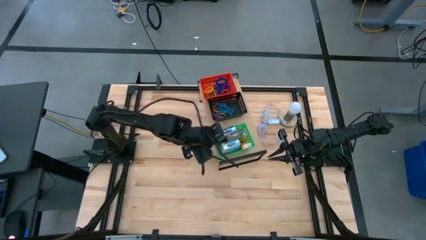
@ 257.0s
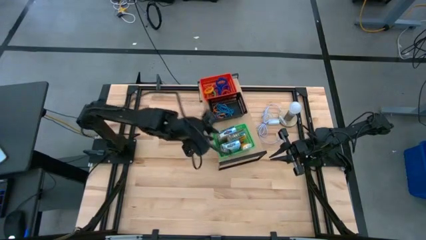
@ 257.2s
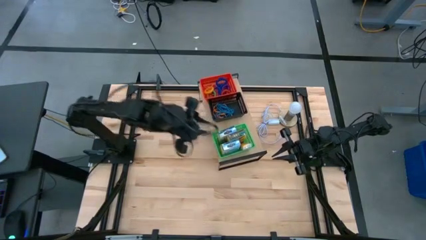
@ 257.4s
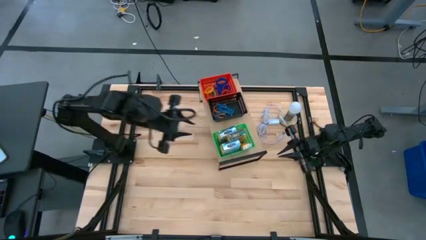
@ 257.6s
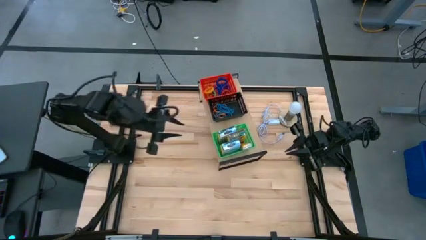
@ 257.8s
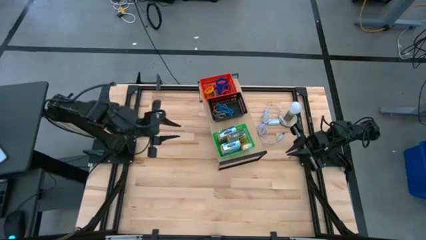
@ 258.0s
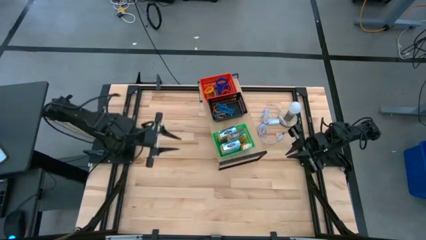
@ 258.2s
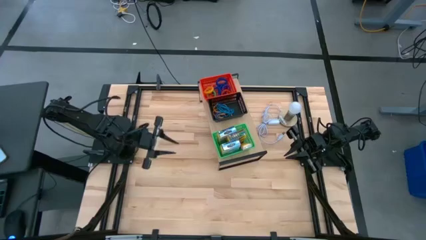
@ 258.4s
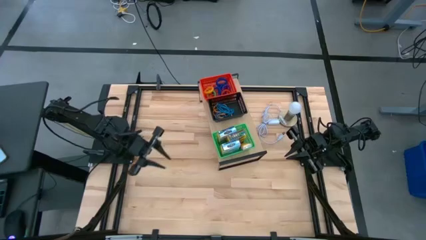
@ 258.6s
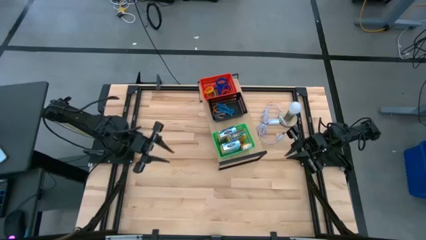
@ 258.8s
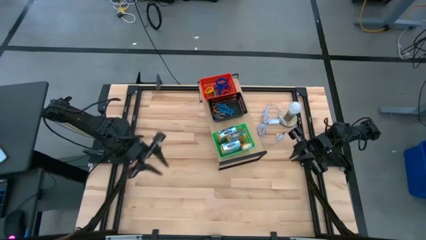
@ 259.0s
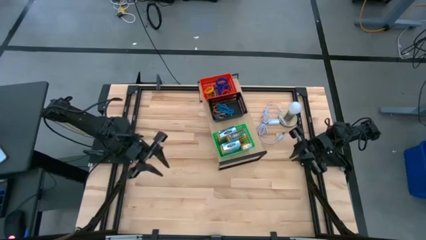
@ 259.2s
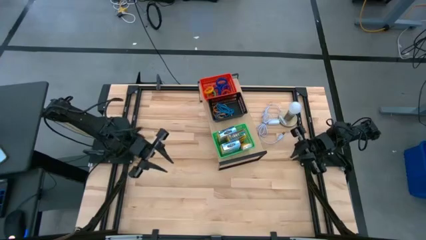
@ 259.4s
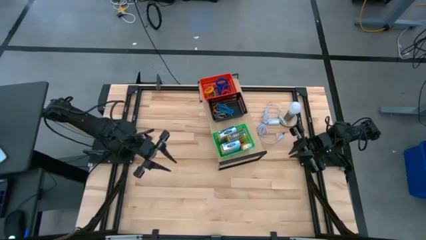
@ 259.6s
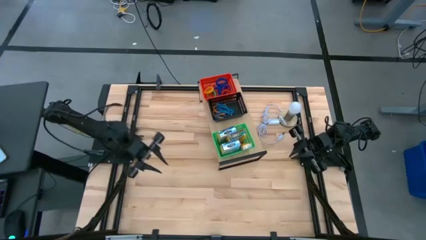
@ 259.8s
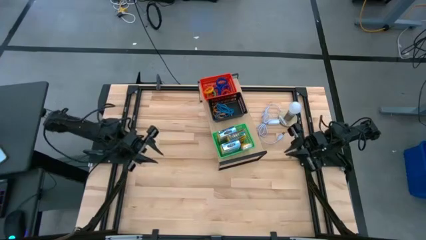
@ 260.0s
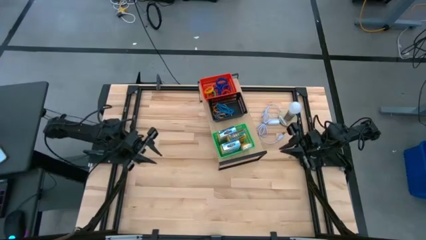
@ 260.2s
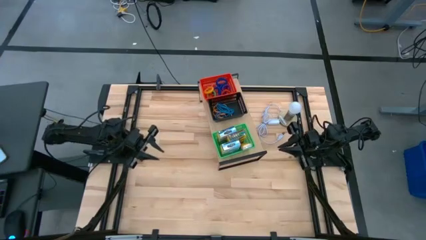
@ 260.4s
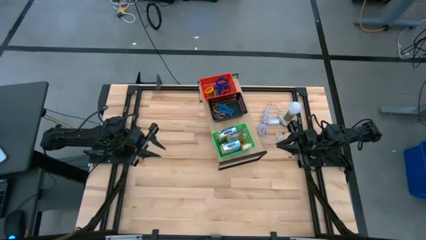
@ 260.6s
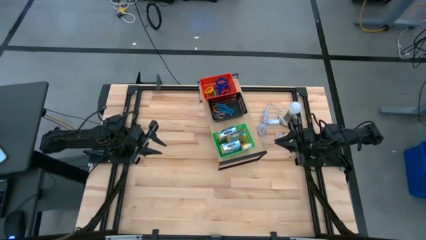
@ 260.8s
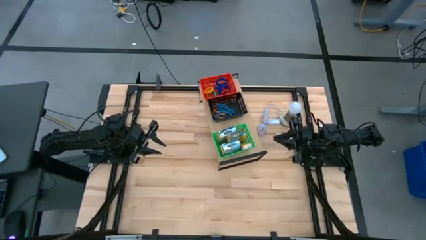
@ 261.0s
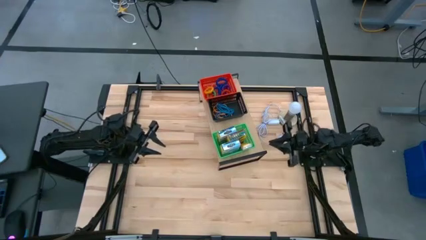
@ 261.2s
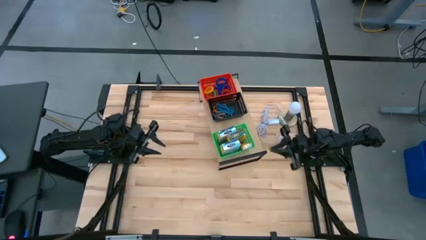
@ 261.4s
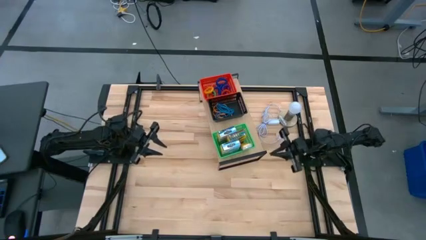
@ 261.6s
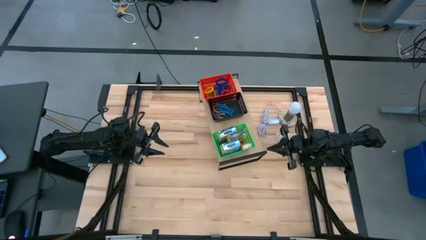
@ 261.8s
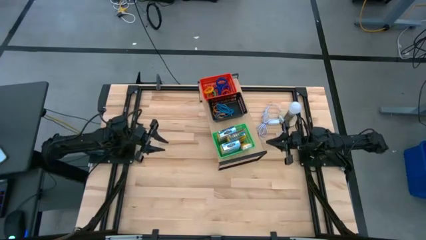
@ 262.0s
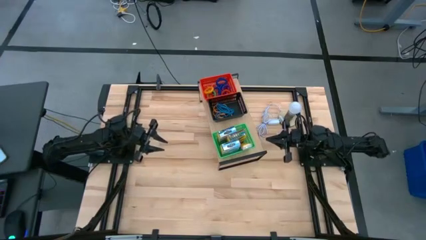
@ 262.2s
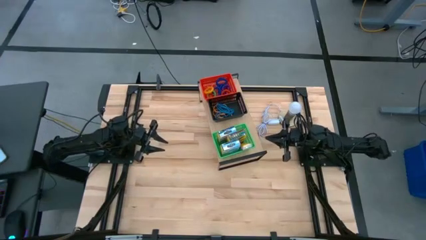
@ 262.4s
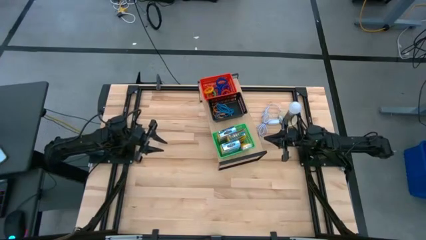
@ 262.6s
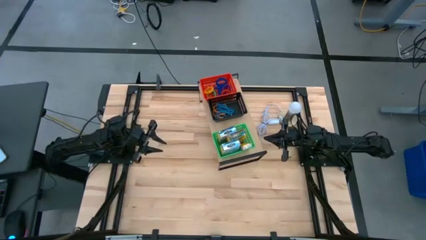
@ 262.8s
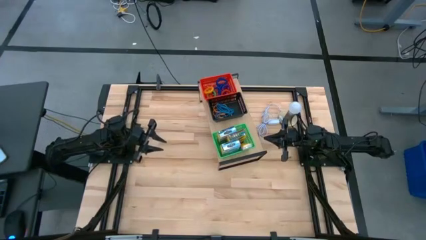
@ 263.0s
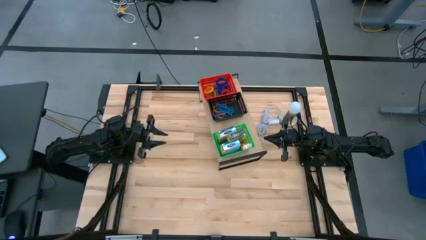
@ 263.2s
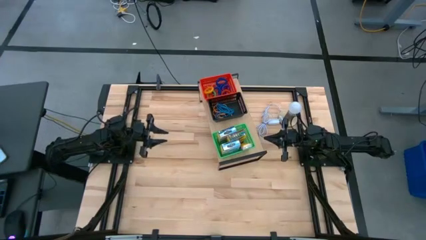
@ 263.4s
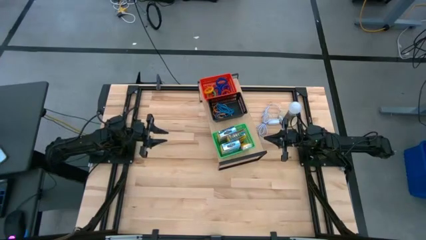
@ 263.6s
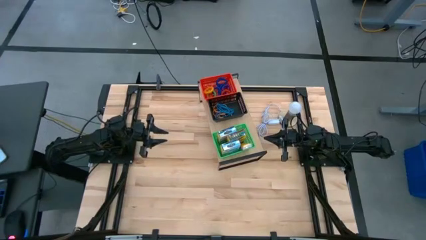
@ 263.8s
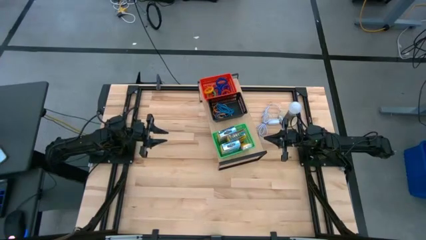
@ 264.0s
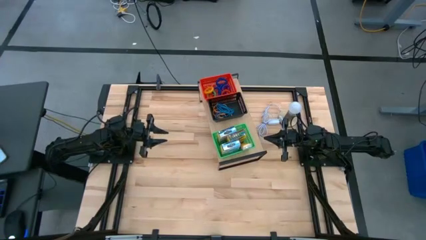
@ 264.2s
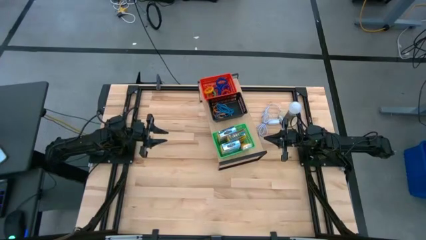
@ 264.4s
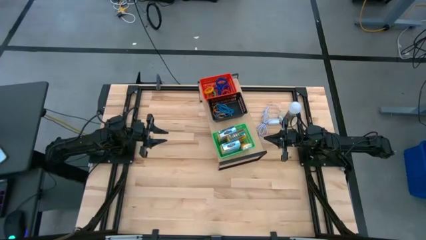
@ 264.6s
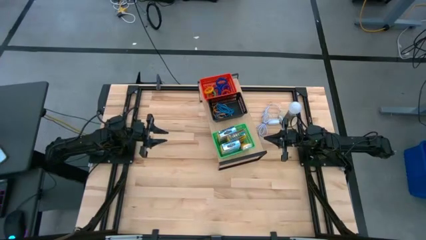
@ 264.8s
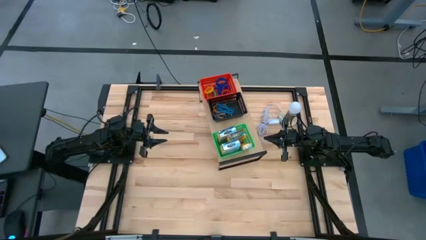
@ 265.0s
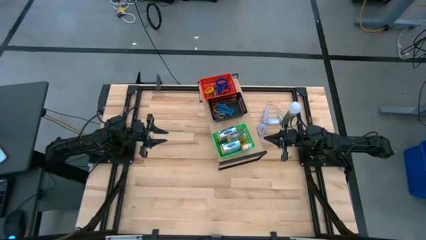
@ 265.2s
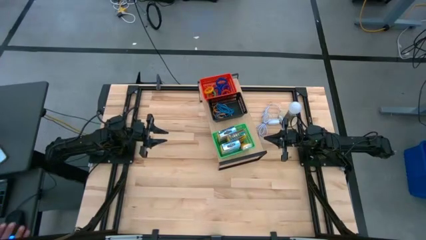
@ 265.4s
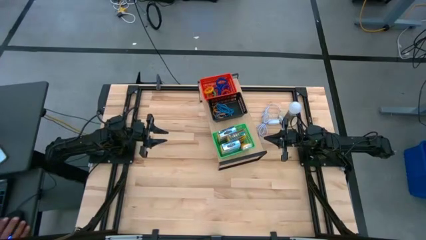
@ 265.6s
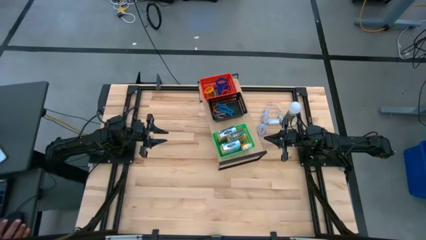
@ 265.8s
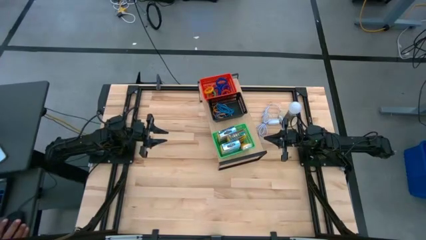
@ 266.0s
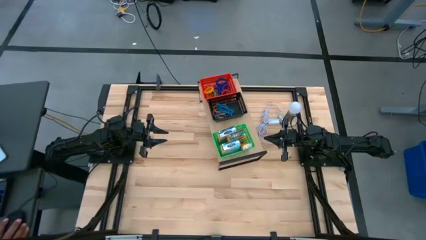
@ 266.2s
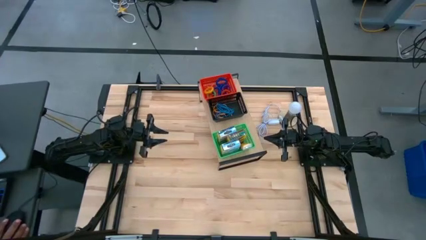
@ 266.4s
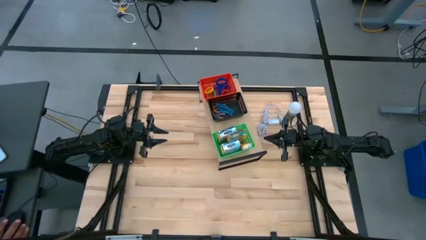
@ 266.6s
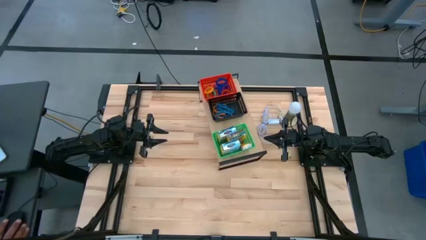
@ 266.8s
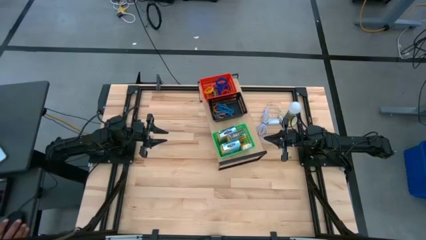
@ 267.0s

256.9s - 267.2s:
Task: Pick & Place Office Desk Supplies
Return to Home Position

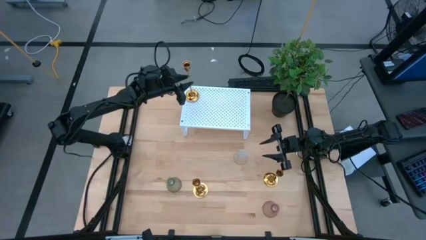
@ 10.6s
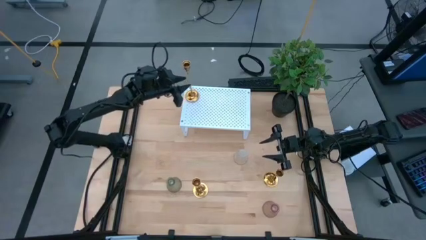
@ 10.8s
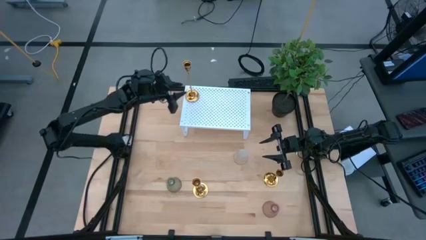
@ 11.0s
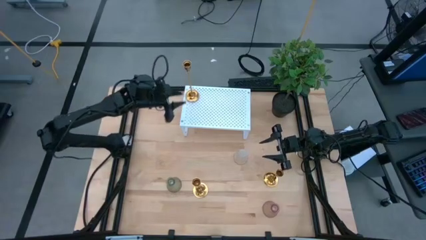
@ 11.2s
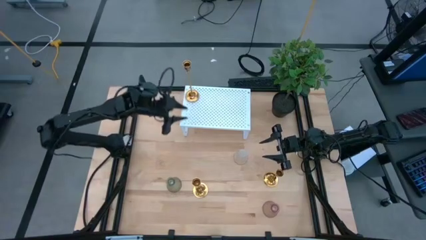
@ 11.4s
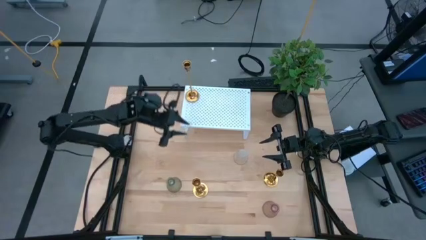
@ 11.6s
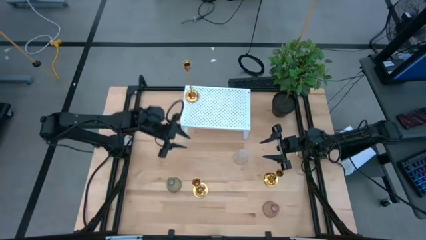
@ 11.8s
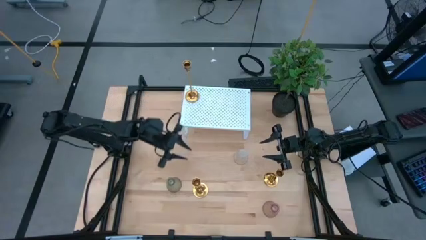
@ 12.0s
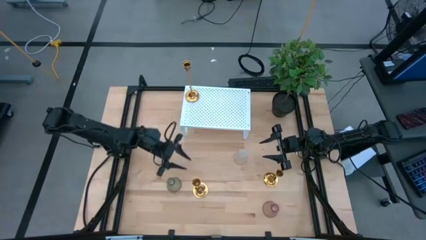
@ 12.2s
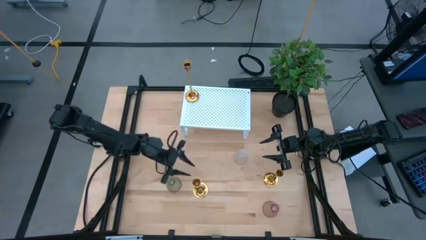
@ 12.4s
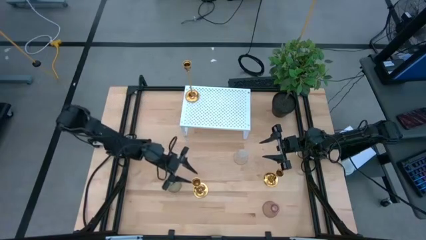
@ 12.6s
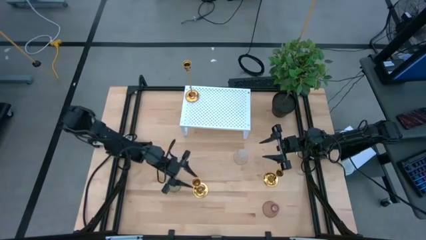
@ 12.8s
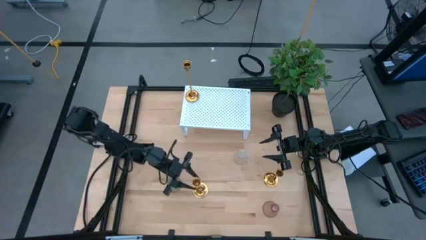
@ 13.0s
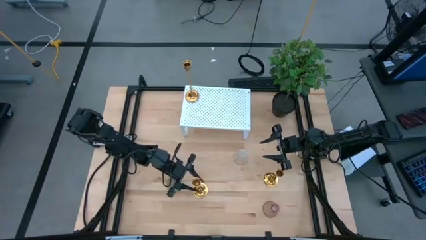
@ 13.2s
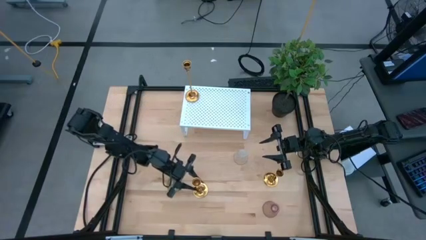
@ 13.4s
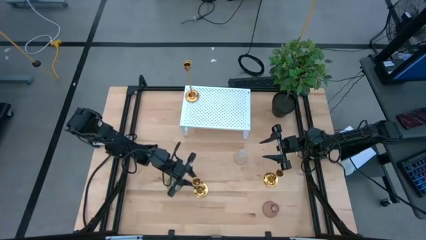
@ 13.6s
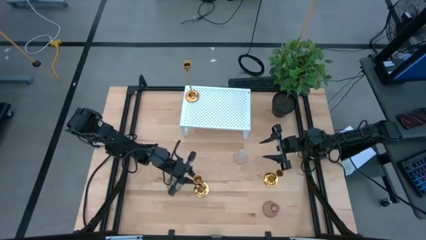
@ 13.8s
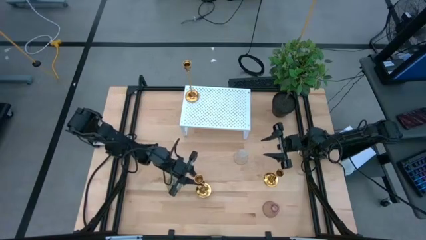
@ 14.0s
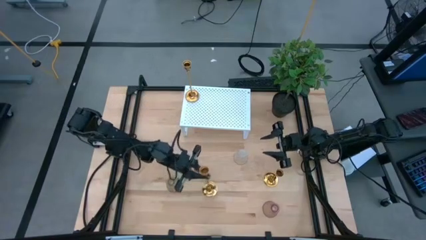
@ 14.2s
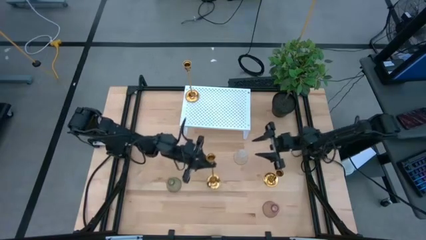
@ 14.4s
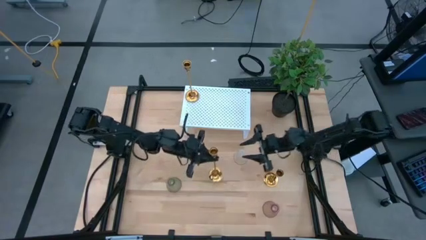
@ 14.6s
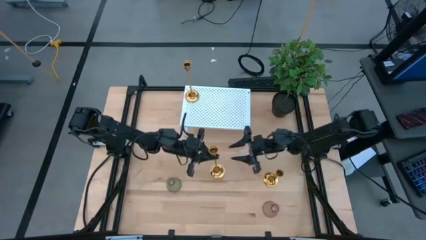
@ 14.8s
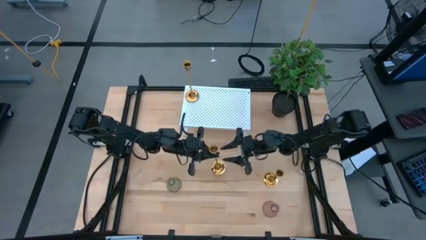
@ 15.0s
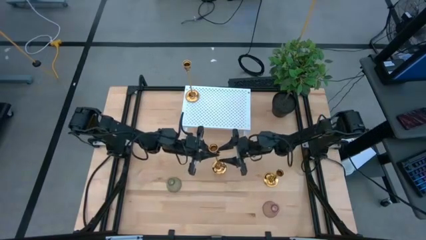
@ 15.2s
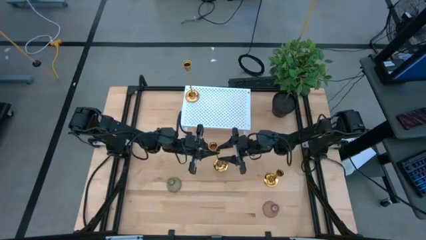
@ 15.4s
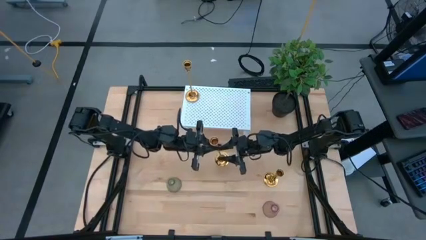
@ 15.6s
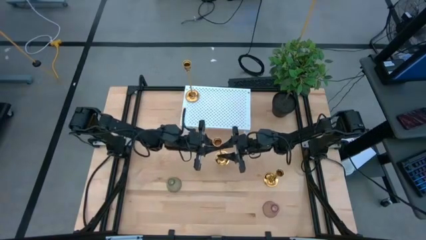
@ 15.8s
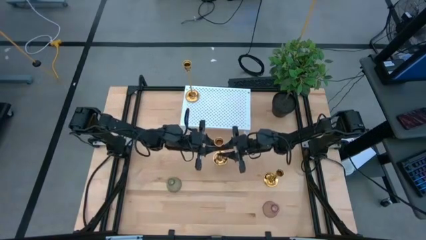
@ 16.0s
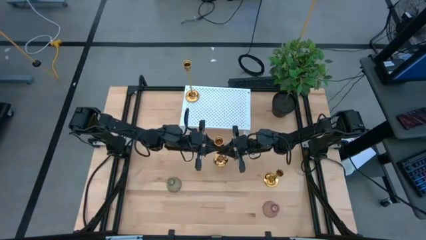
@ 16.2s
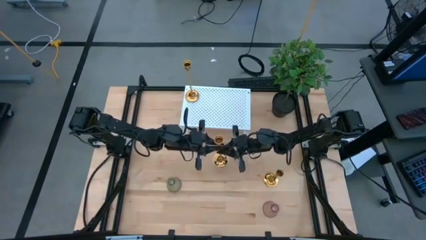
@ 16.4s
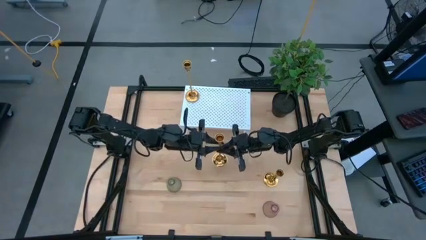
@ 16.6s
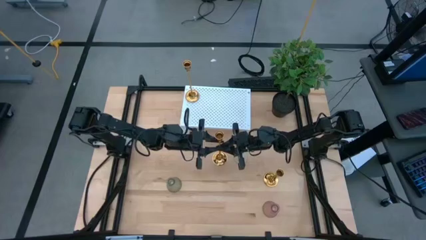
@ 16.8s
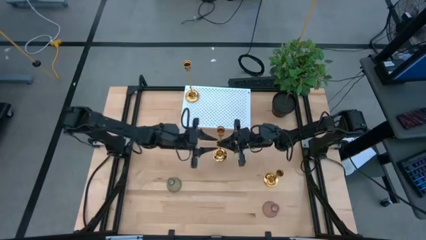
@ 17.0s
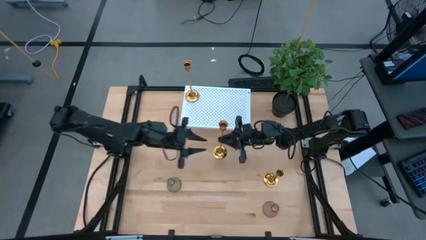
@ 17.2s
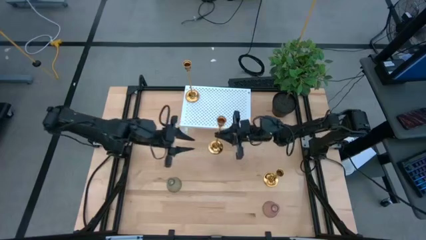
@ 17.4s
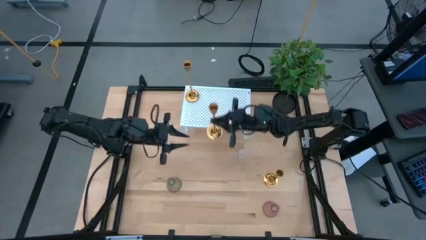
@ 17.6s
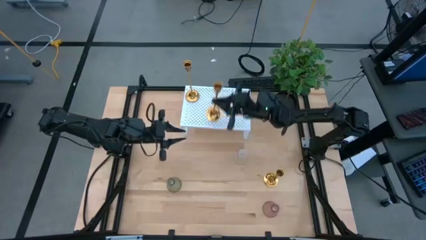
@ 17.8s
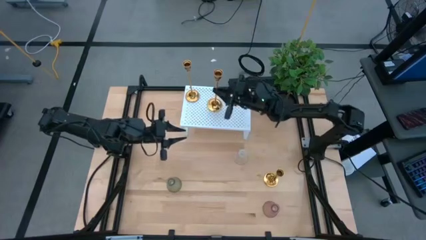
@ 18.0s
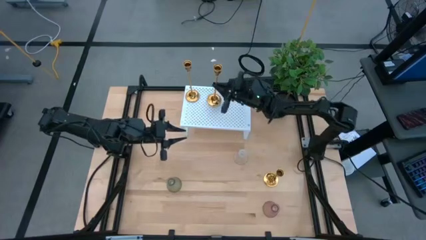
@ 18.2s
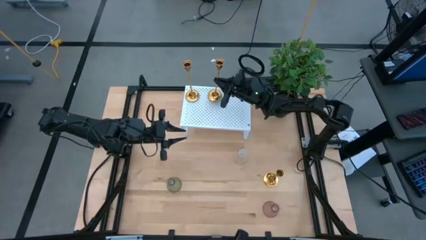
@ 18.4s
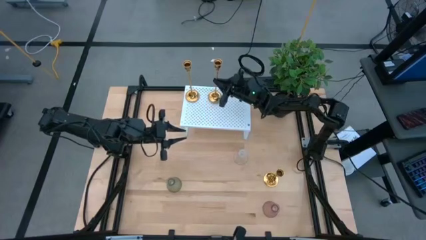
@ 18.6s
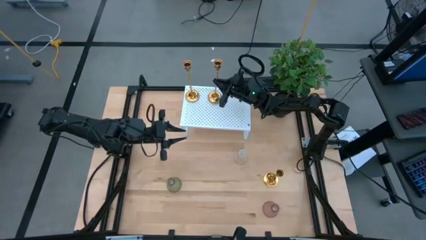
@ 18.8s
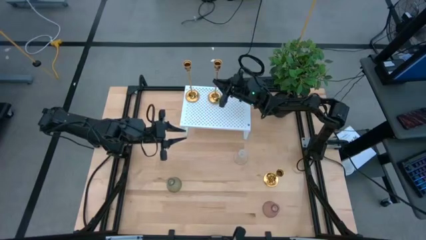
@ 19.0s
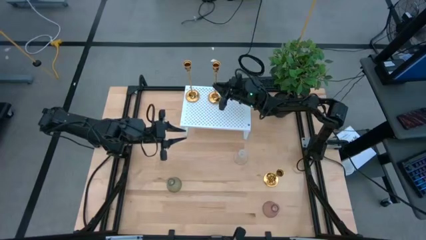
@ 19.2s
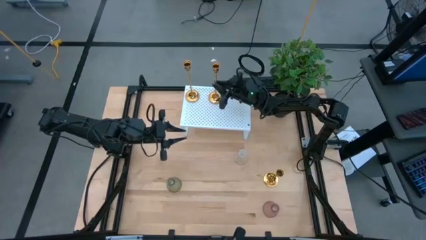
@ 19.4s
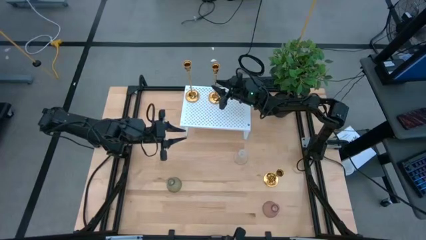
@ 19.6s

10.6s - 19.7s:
Task: Pick & Place candle stick holders
Put the left gold candle holder on the shelf aligned with the other gold candle holder
